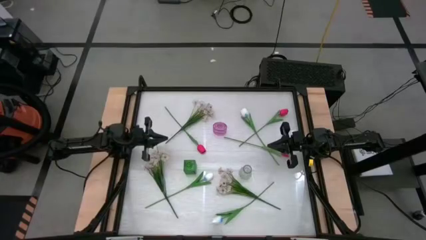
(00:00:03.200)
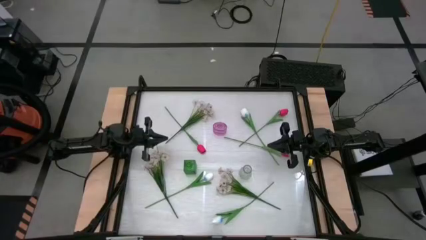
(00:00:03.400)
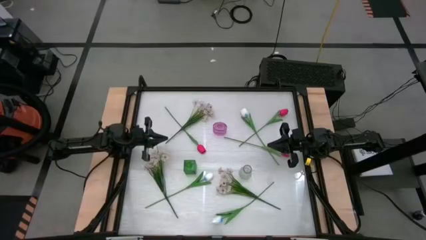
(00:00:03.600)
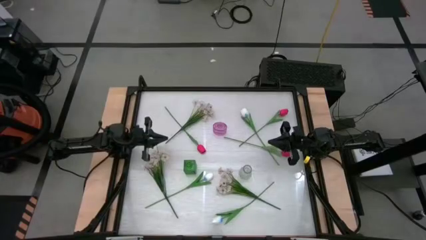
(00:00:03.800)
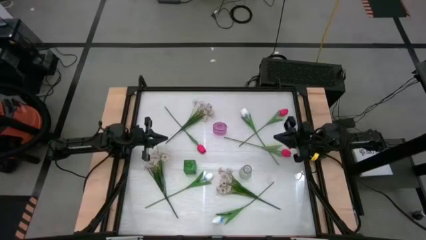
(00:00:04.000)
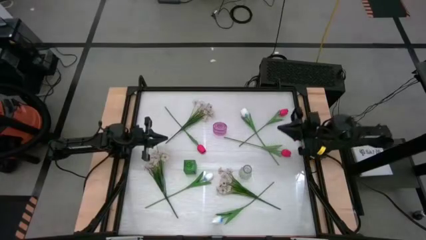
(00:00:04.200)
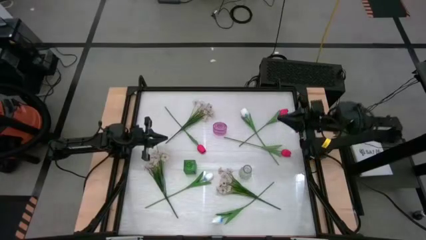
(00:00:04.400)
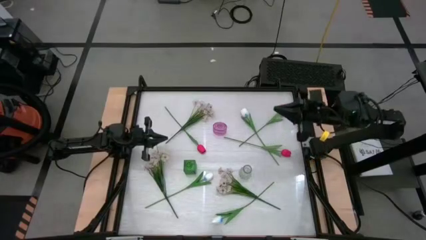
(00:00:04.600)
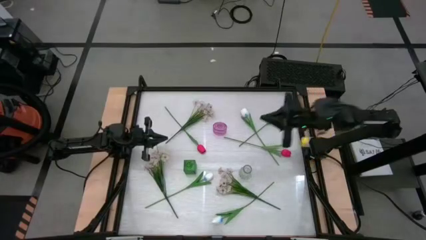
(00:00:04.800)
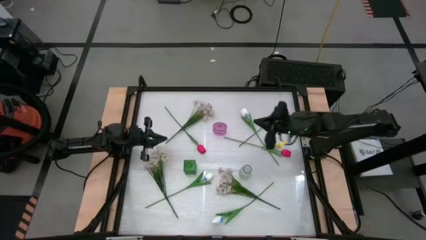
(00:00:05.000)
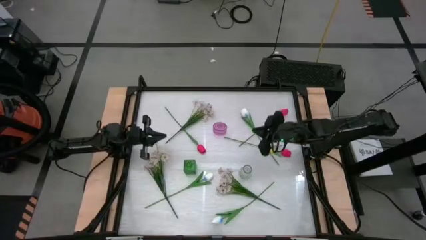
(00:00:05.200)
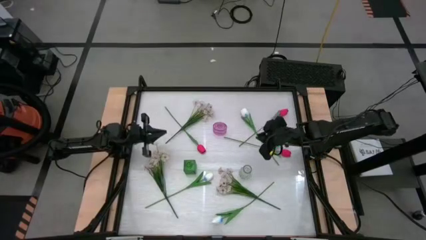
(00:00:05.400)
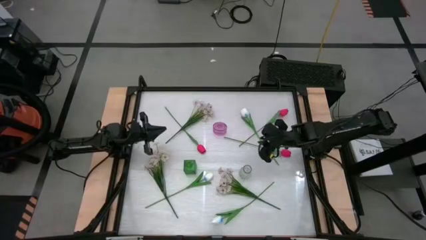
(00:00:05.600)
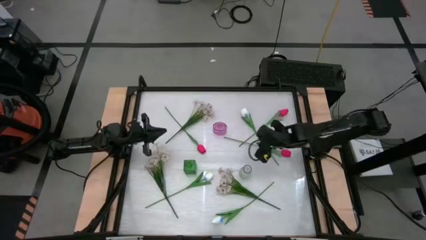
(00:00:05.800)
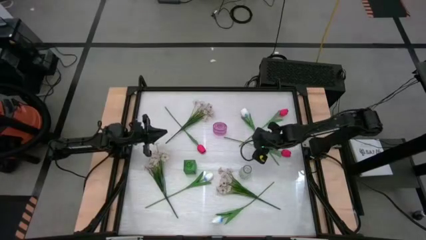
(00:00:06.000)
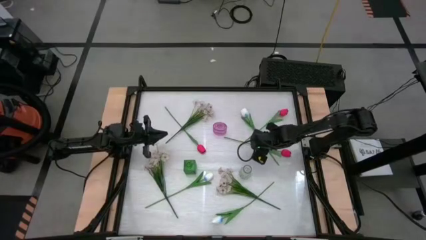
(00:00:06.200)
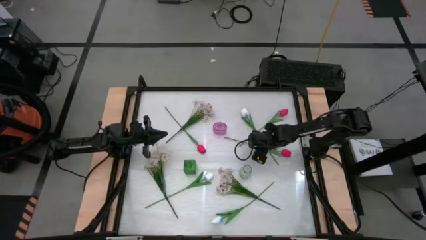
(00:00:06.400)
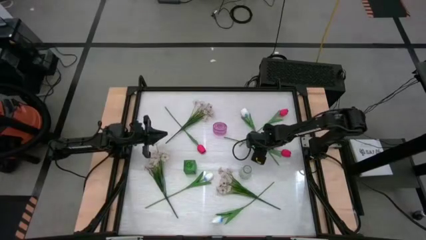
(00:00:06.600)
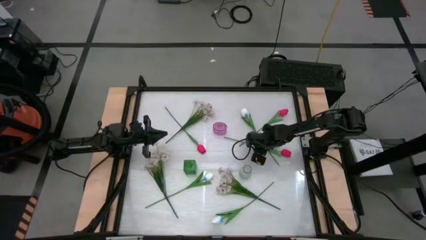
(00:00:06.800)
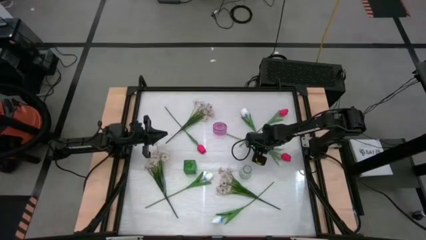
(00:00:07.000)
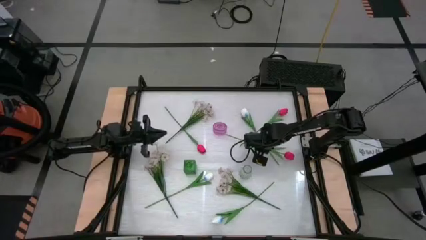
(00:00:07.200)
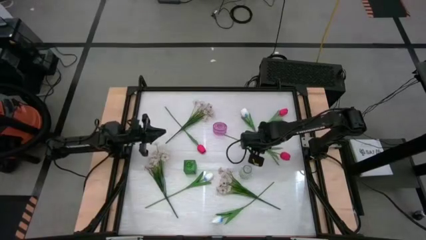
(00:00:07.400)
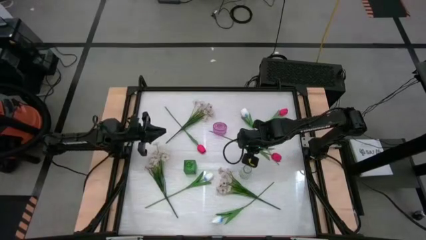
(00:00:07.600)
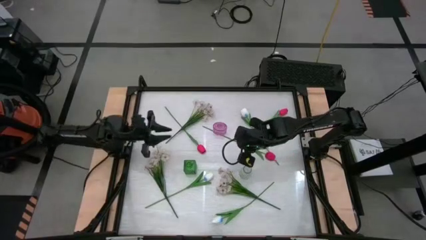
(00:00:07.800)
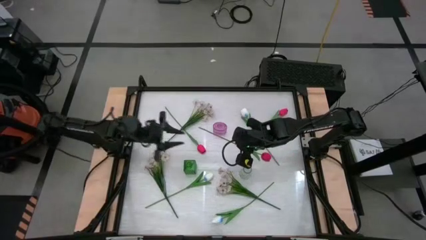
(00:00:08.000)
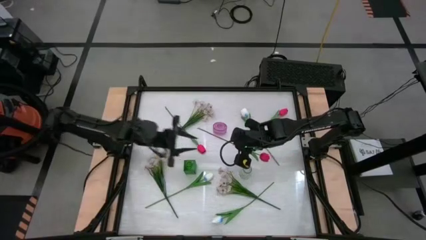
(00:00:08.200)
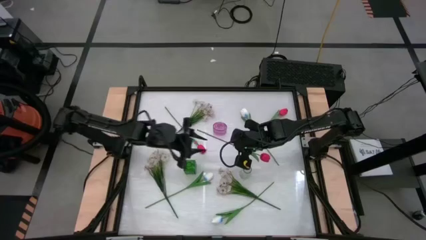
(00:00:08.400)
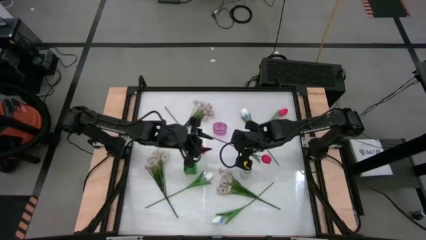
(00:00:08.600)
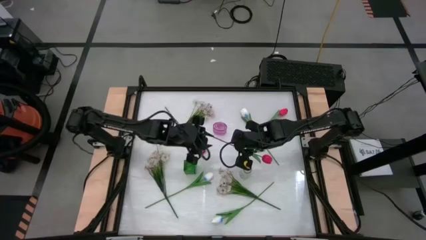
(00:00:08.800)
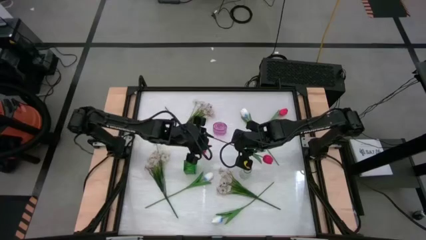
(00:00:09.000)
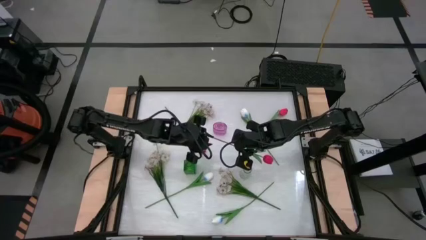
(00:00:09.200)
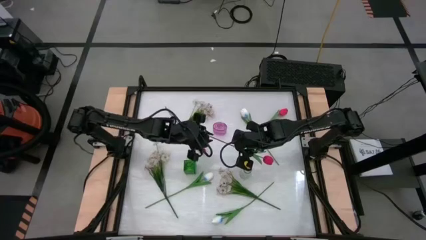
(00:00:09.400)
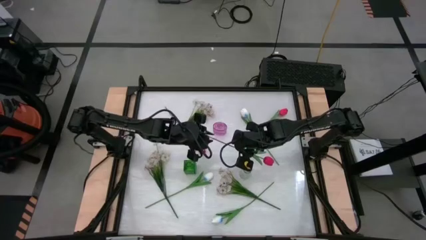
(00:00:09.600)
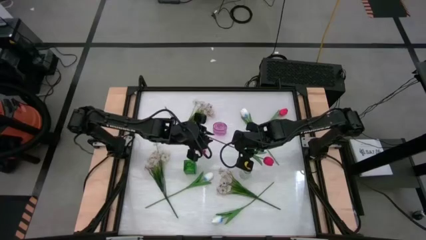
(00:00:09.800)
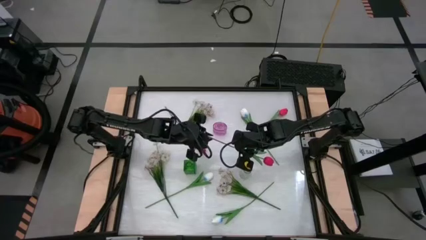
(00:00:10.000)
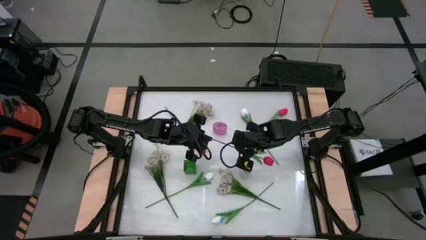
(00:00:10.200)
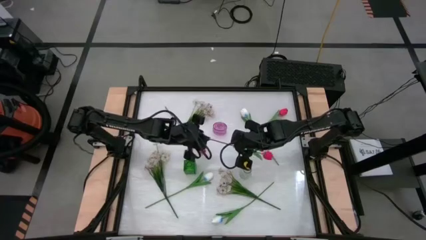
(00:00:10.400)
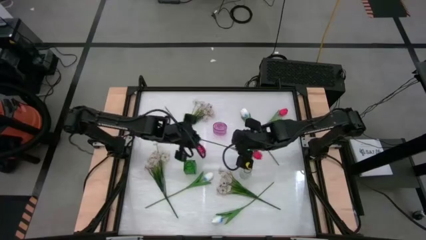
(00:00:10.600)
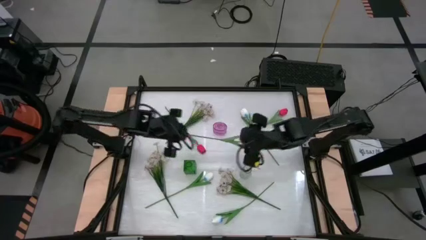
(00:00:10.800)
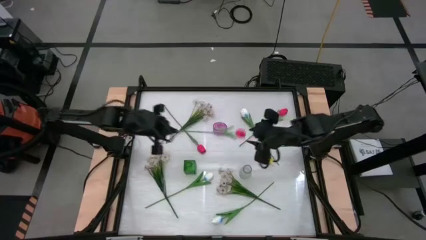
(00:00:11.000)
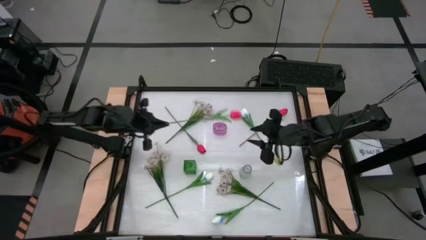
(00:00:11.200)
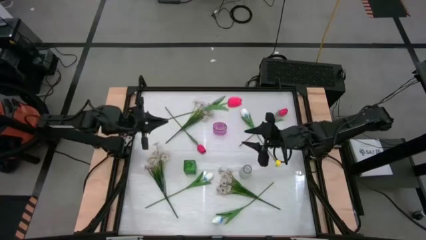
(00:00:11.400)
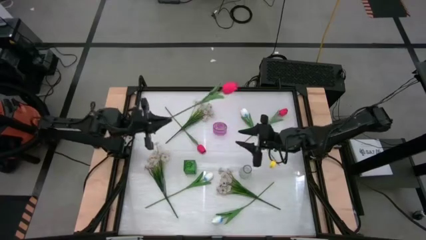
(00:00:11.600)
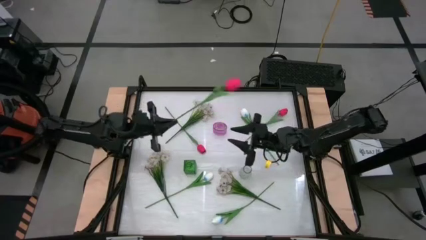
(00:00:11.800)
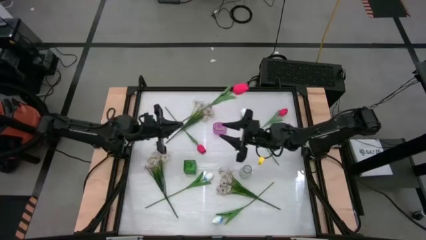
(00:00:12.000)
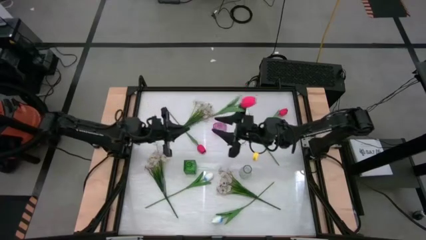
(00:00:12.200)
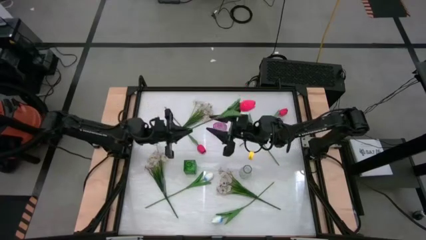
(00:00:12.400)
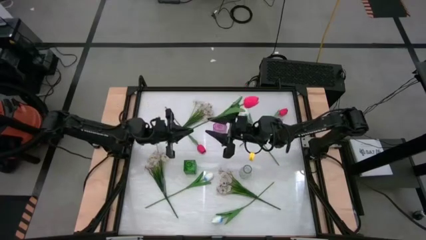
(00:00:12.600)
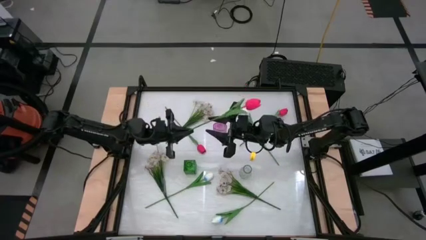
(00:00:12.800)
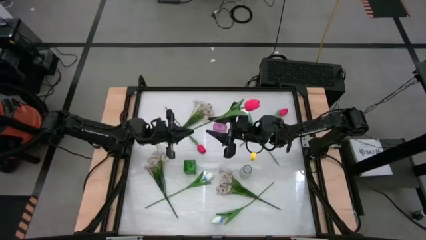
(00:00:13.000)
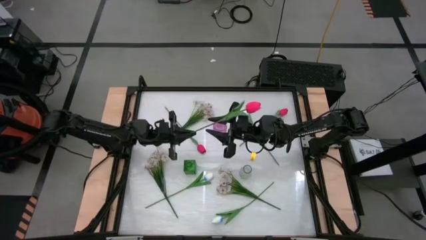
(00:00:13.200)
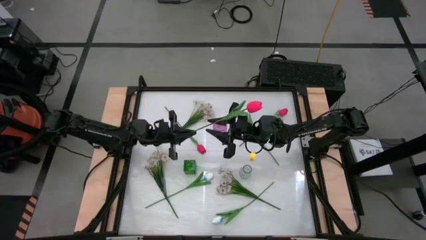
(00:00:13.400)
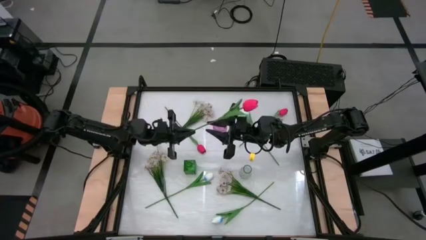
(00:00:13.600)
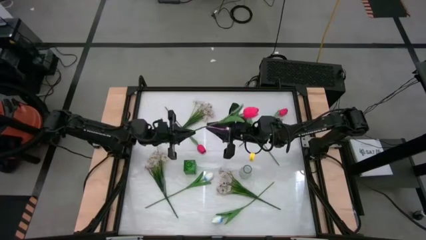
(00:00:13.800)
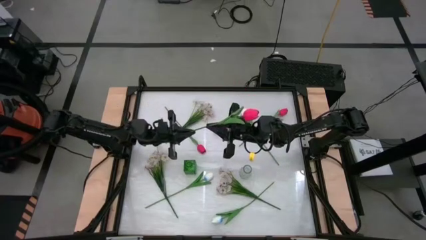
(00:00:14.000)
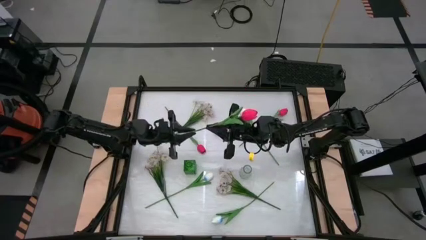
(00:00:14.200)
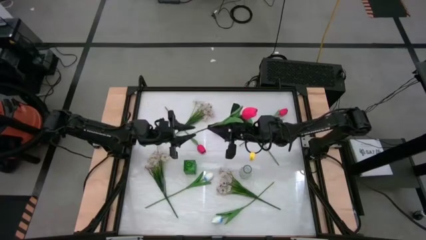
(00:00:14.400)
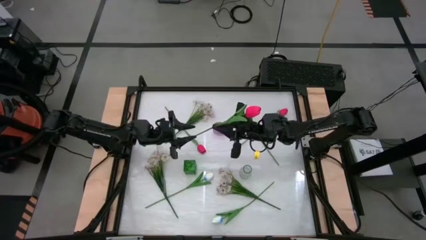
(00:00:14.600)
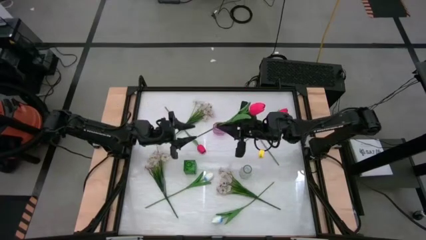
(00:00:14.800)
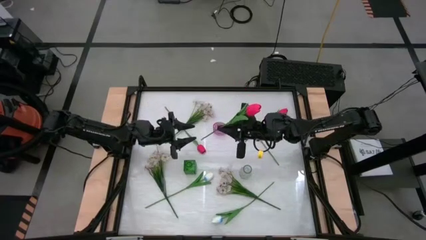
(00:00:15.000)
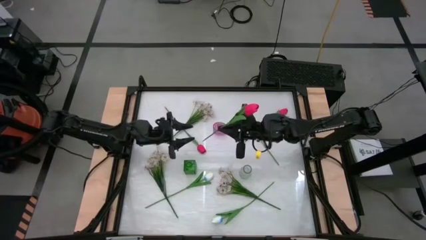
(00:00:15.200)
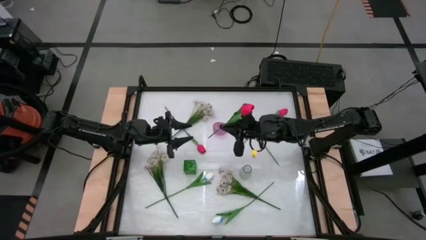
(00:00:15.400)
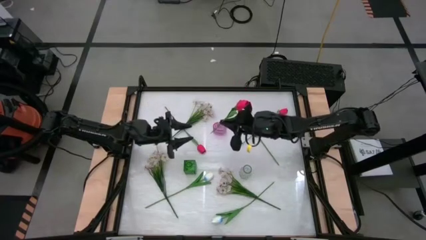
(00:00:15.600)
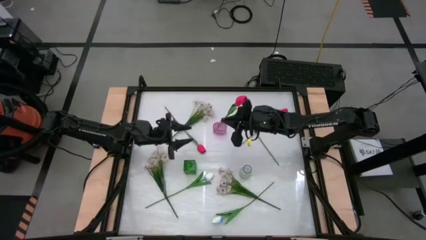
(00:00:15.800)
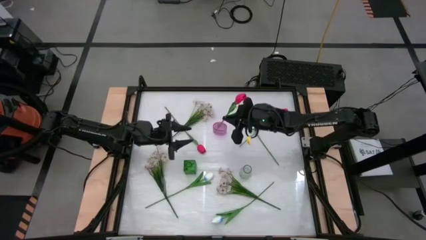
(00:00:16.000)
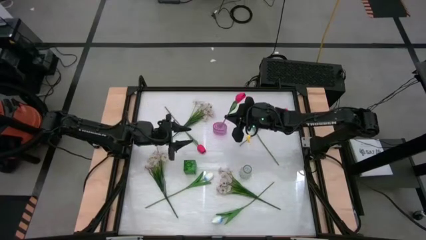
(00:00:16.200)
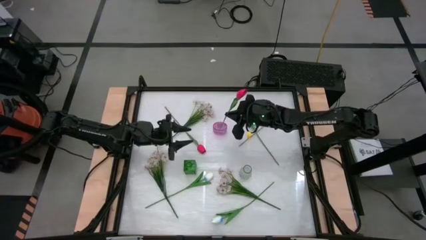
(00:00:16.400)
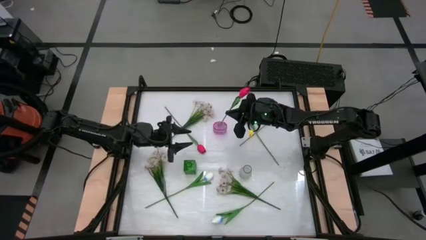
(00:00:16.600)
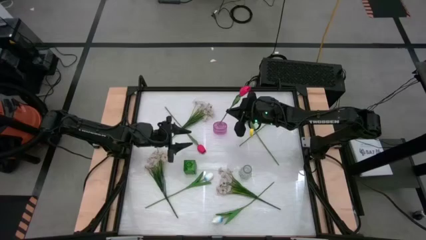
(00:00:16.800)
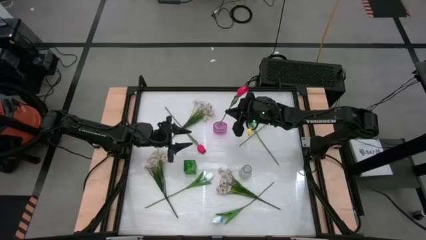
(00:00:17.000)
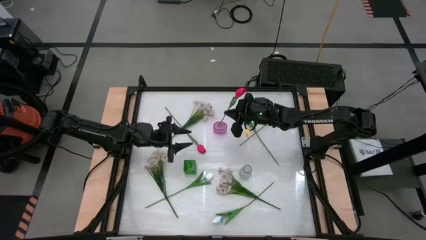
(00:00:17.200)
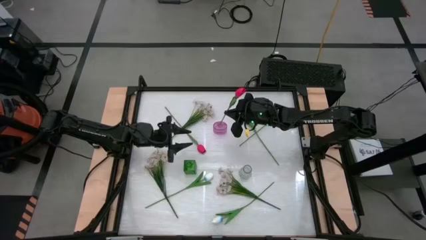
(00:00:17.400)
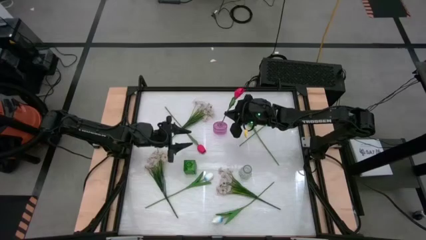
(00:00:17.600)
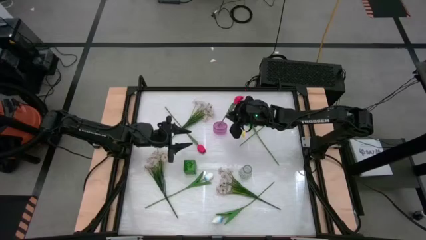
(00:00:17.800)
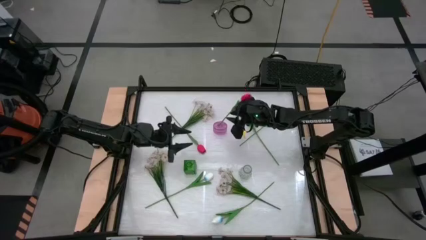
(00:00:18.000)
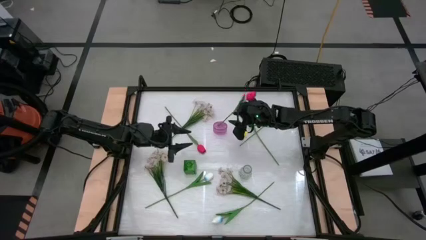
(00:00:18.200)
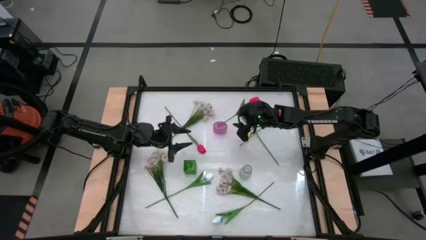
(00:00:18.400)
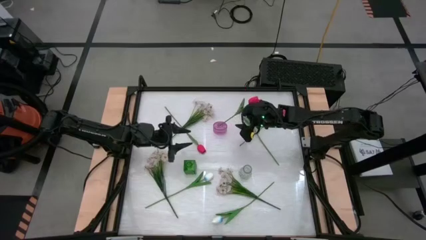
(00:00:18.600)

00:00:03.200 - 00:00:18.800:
Task: Sort flowers into vase by color
Put the bottom right red flower into the purple vase
